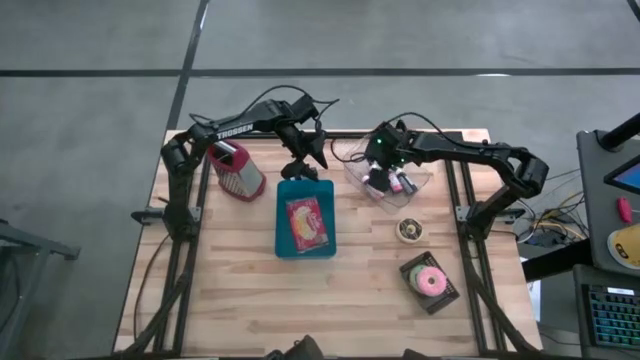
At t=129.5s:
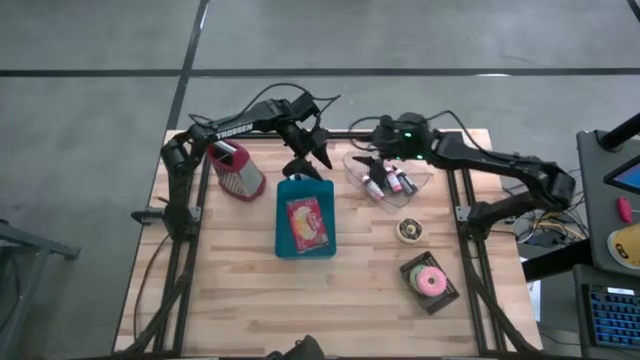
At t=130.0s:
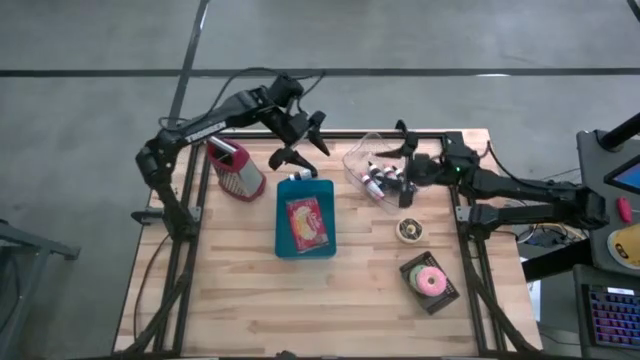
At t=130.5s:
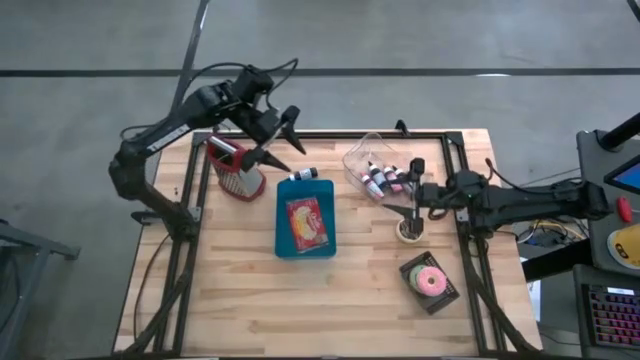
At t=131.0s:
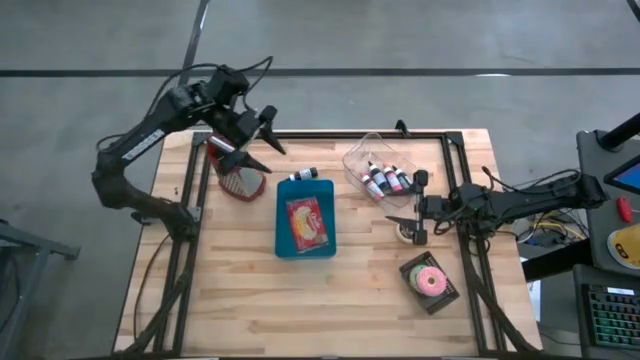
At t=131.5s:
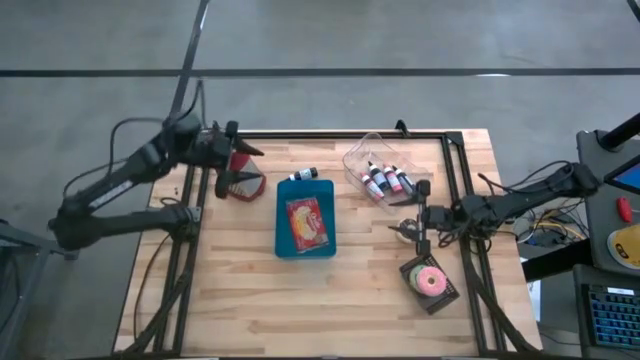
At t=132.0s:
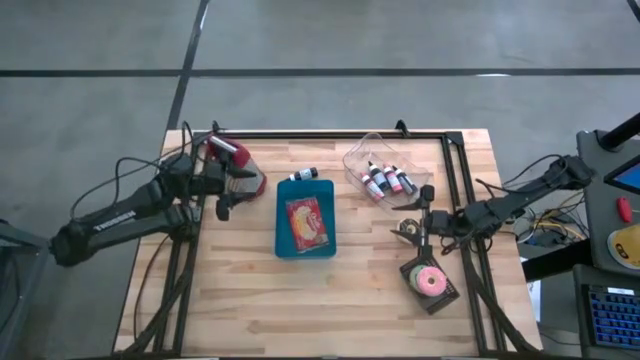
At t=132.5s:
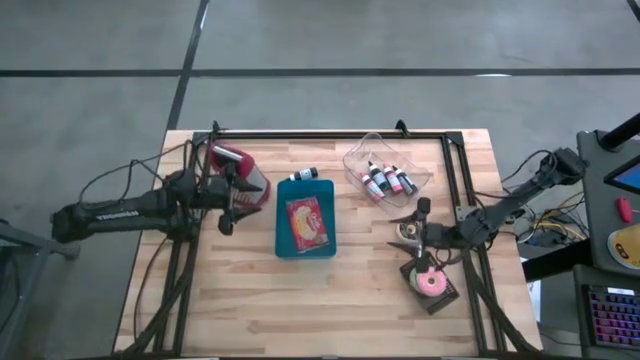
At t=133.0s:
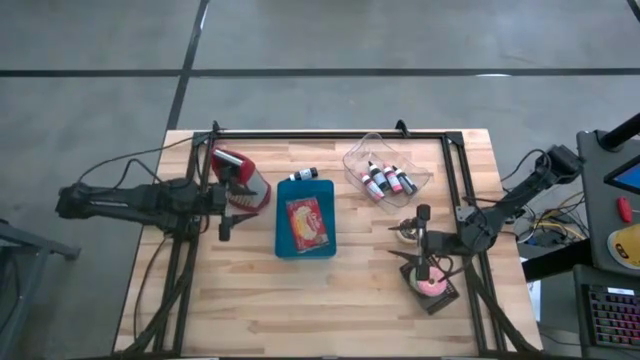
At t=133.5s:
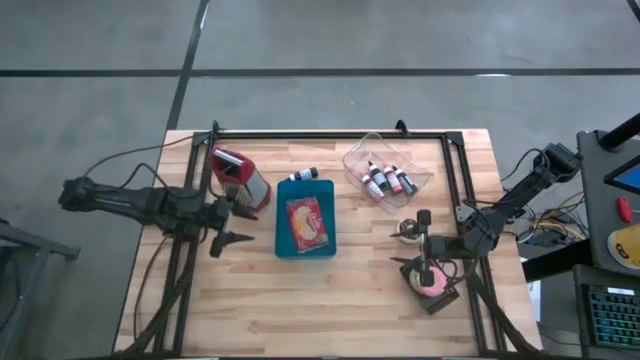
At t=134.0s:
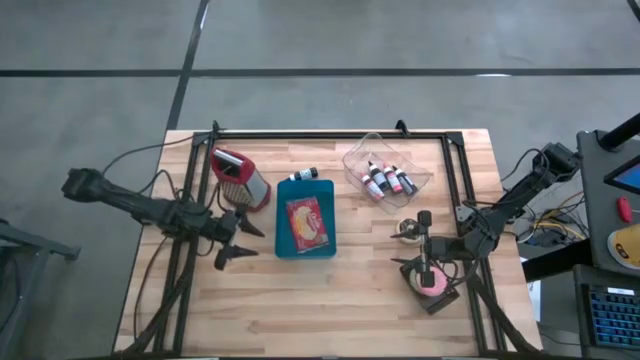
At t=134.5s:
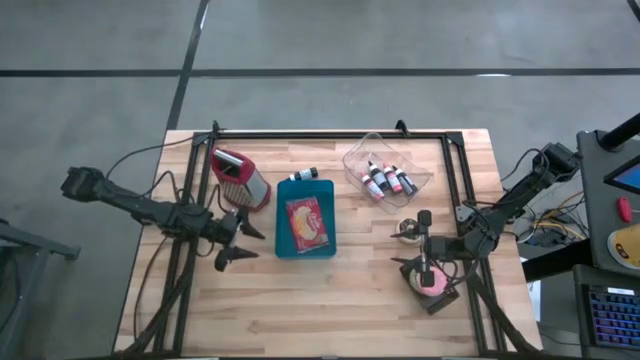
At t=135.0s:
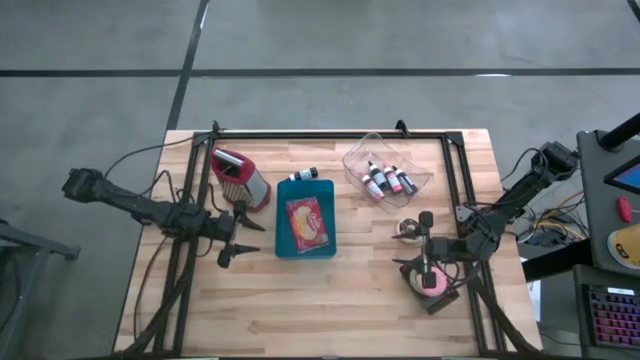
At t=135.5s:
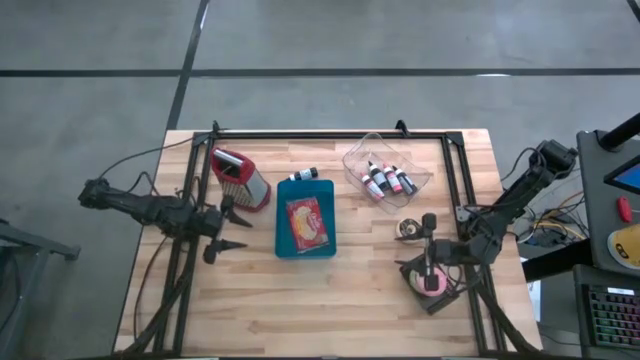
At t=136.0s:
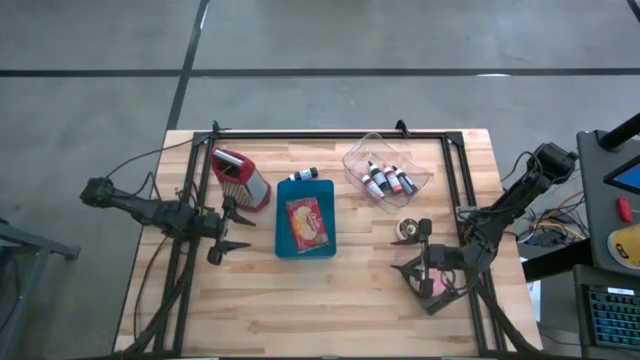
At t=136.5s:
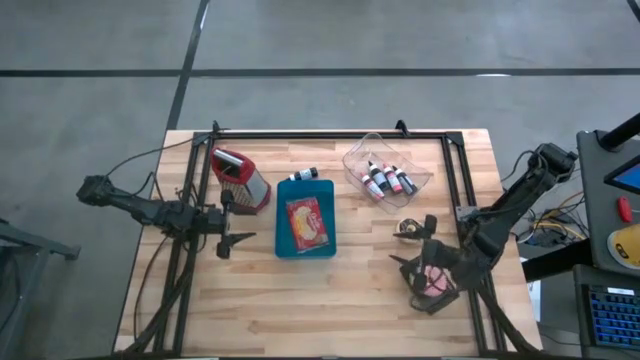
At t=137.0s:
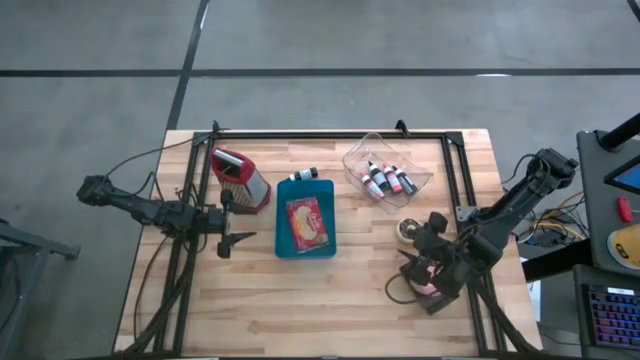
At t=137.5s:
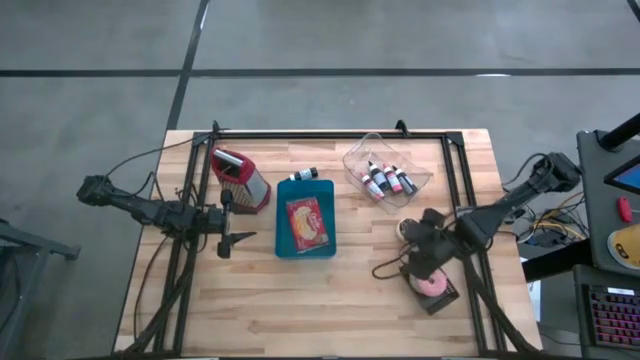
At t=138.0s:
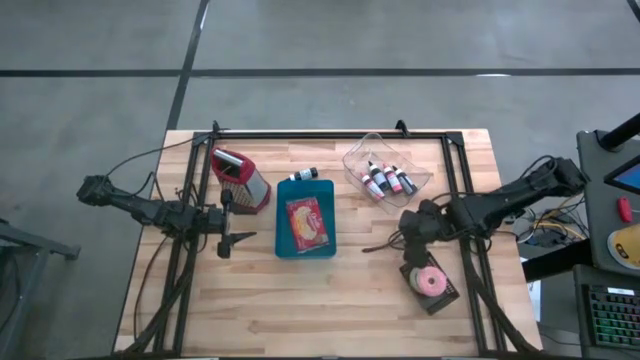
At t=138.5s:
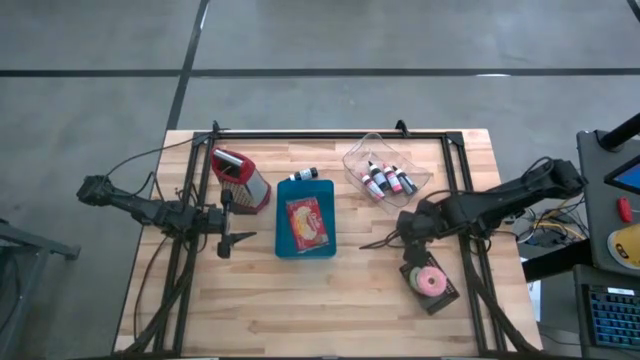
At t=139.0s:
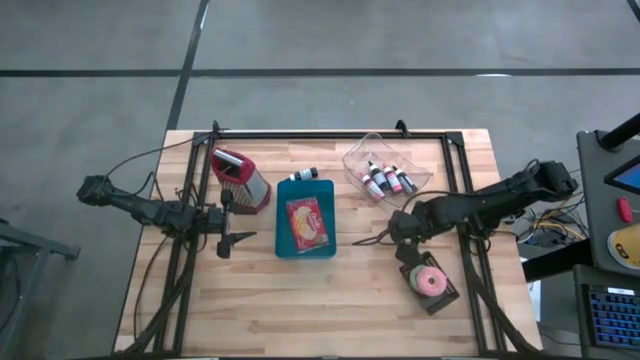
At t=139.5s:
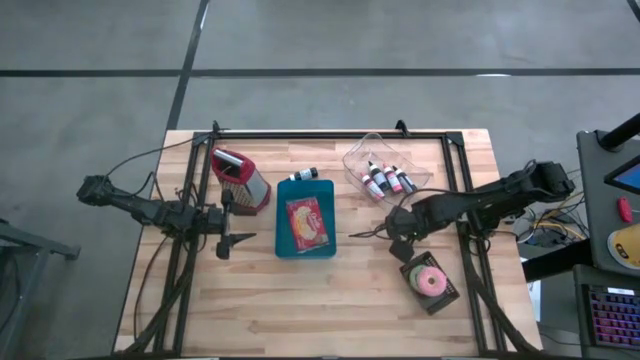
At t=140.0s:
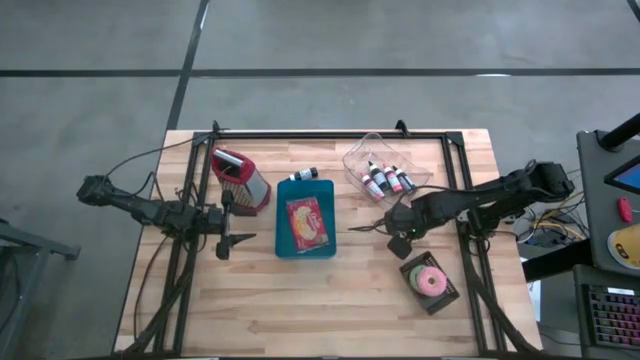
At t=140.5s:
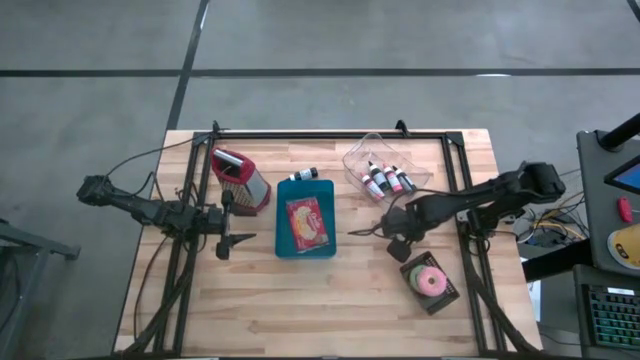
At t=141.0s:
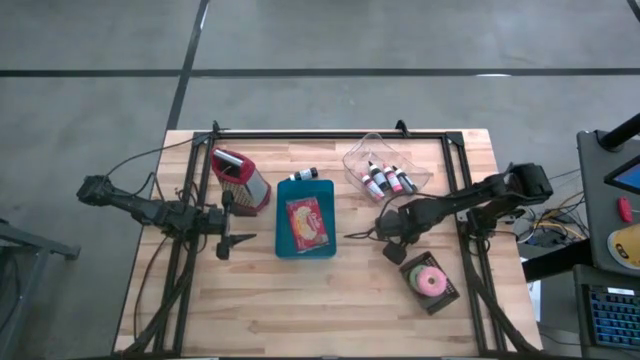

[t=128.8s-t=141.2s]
Task: Pick & Place Food Item
Put the black donut into the black bin

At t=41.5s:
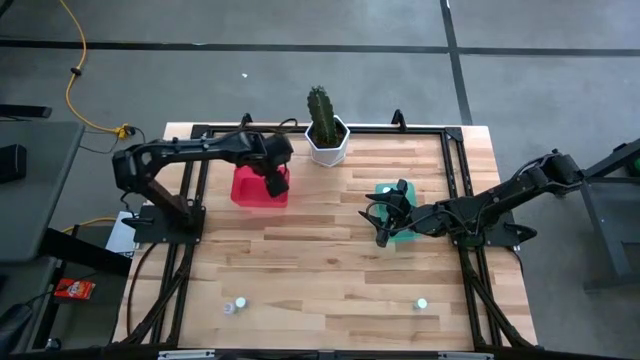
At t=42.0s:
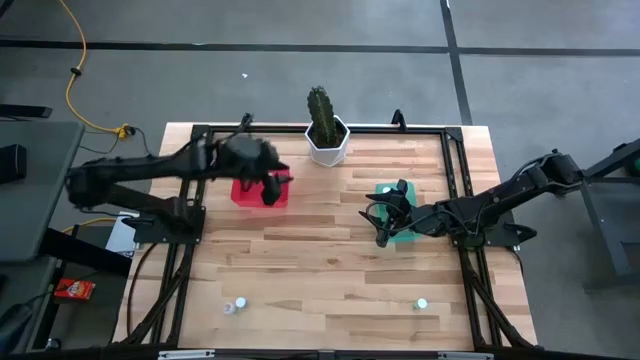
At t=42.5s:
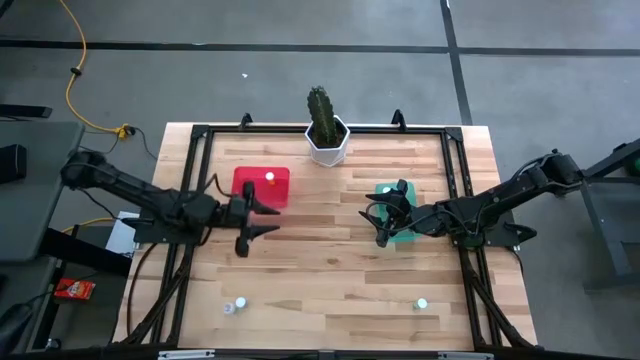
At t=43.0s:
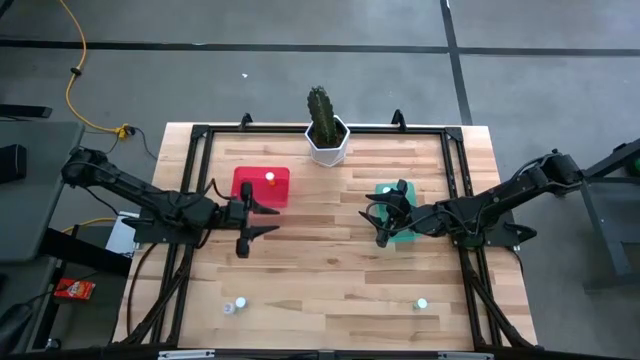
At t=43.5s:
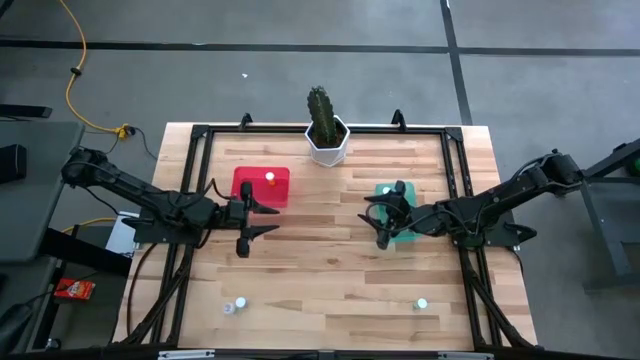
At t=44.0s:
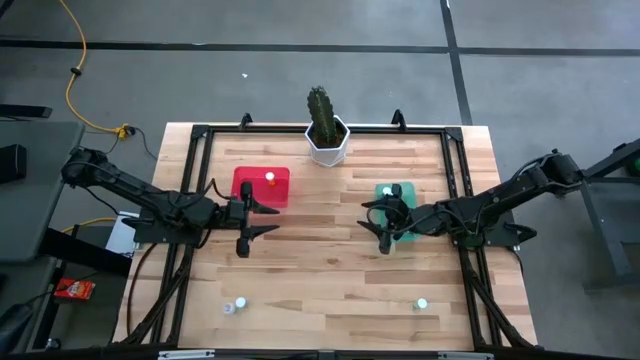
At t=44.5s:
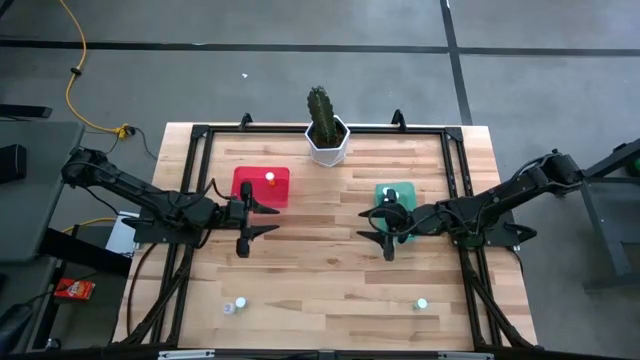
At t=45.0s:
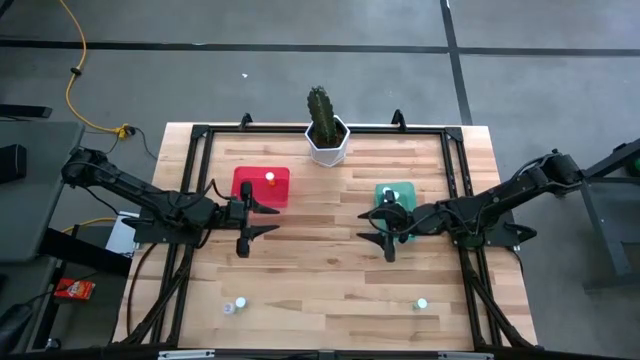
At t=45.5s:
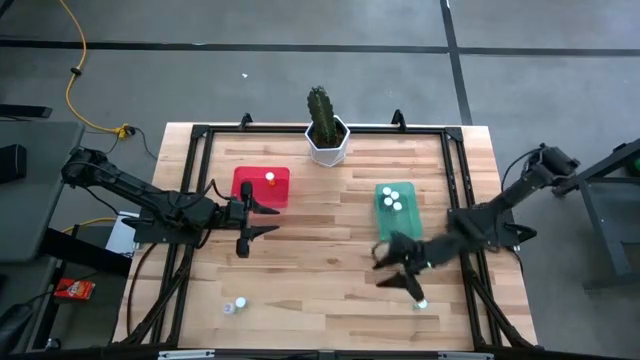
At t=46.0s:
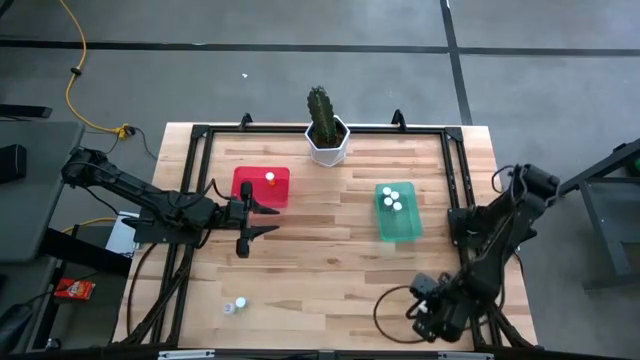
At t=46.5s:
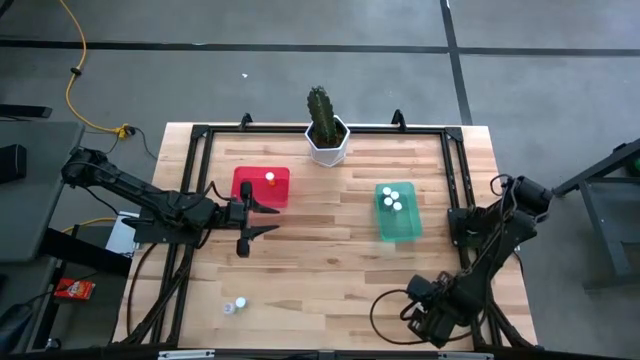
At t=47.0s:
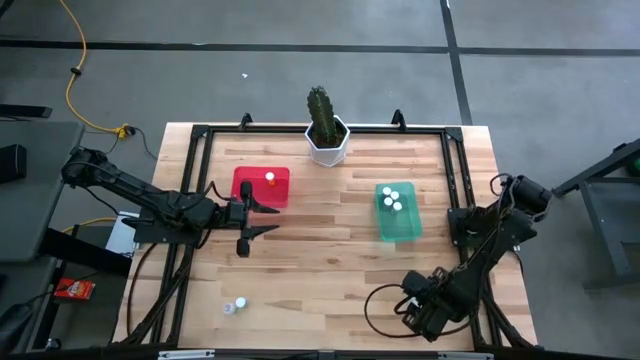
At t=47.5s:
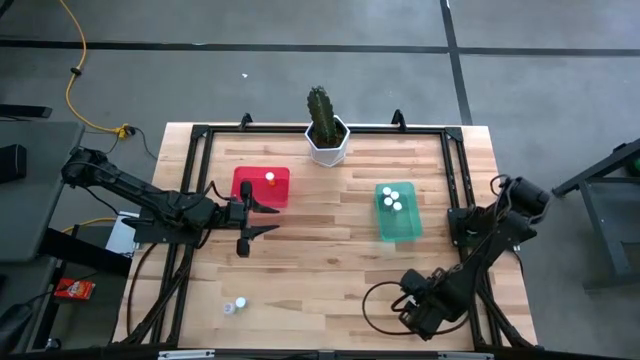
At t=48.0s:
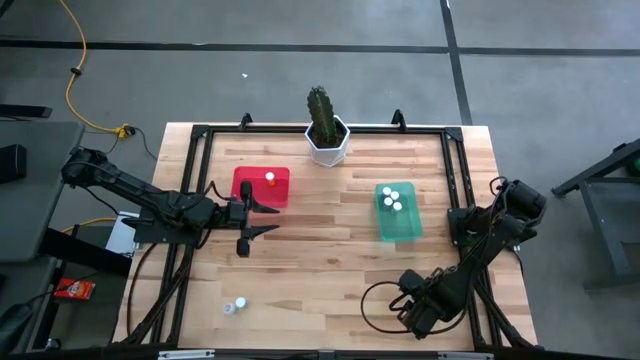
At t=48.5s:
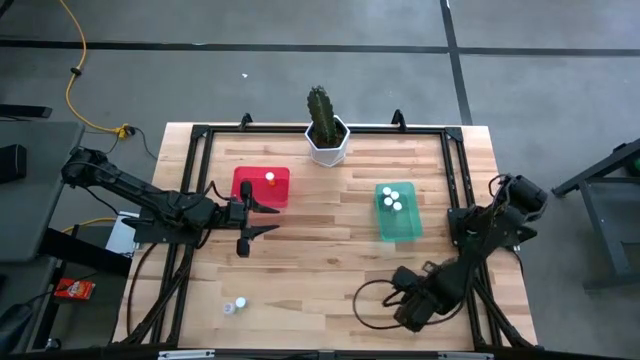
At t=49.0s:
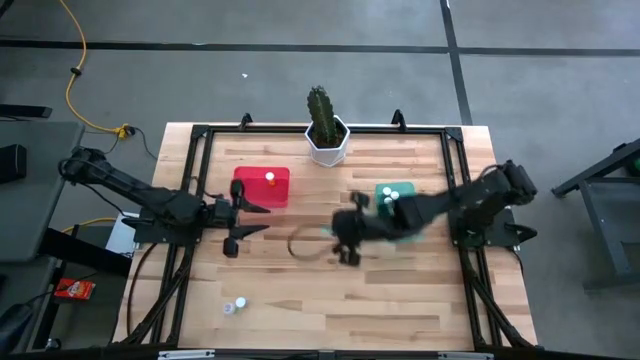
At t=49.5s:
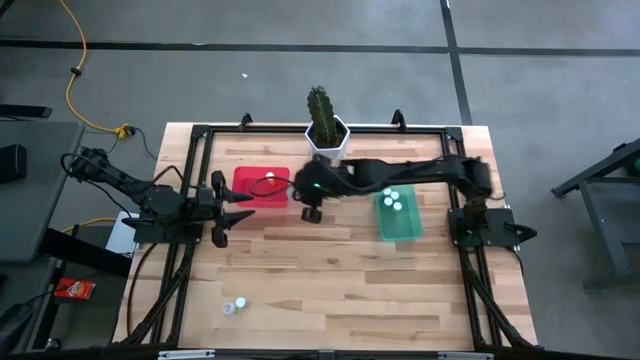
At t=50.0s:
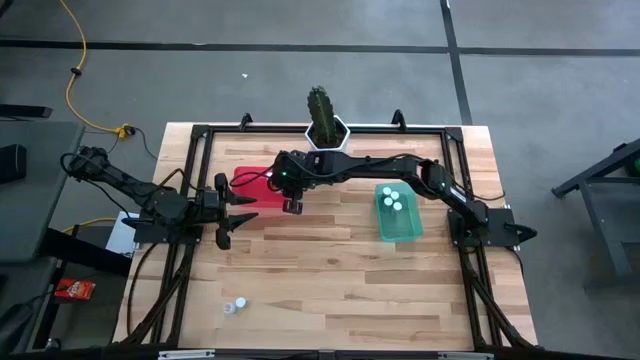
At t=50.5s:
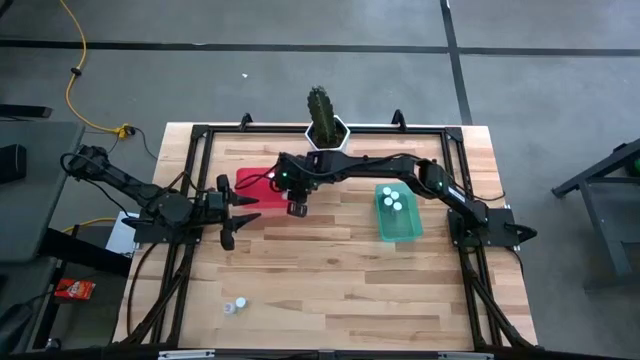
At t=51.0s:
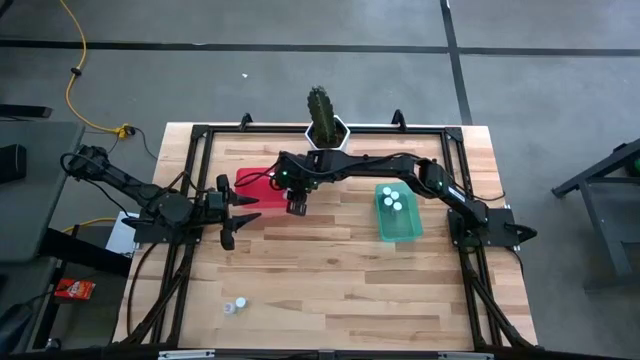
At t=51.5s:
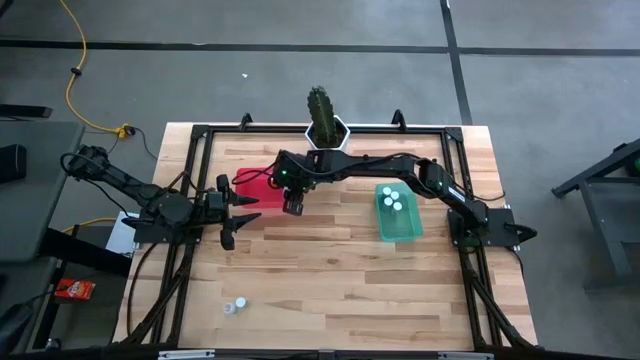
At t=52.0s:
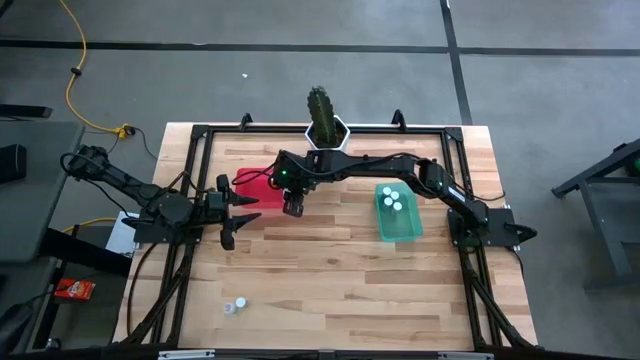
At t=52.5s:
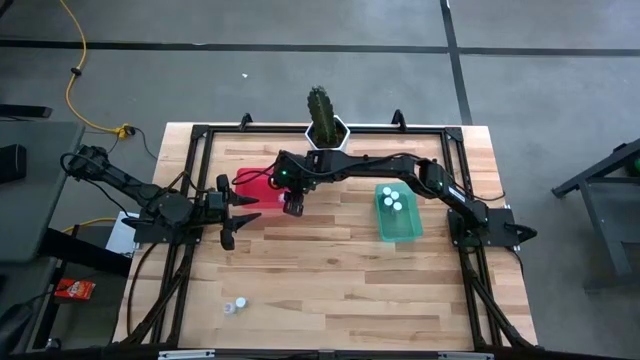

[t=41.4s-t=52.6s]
Task: Pick and place medicine bottles into bin by pill shape (circle, oval)
Put the green tablet bottle into the red bin
